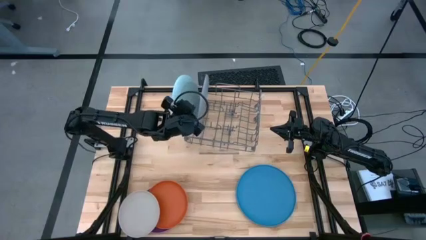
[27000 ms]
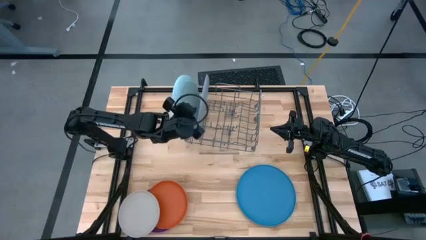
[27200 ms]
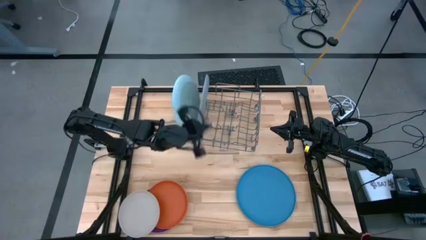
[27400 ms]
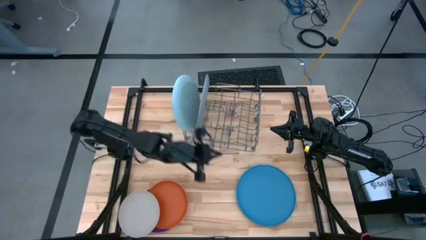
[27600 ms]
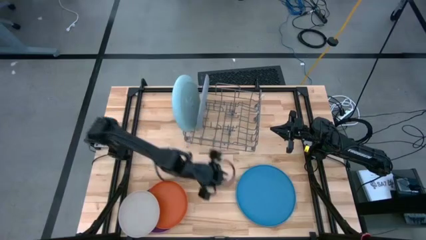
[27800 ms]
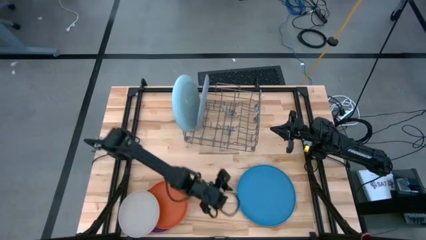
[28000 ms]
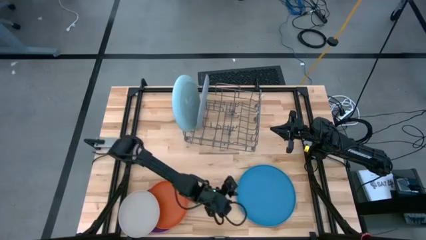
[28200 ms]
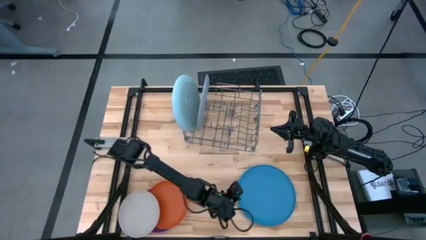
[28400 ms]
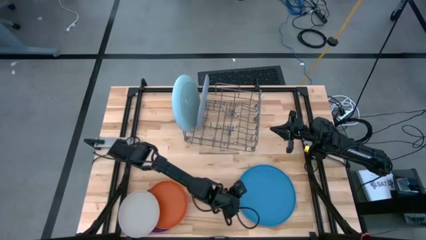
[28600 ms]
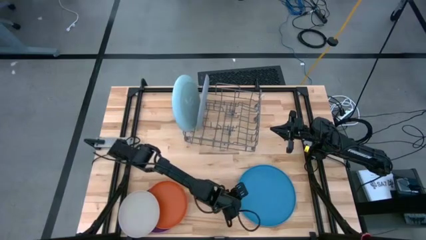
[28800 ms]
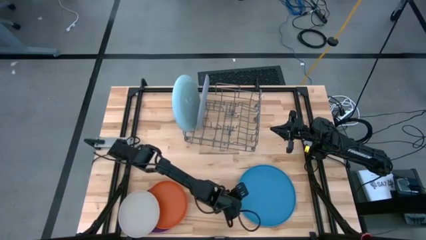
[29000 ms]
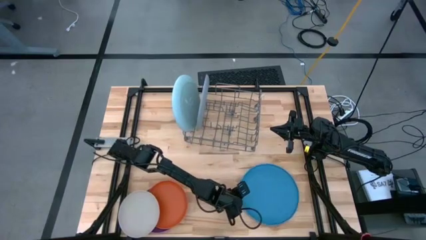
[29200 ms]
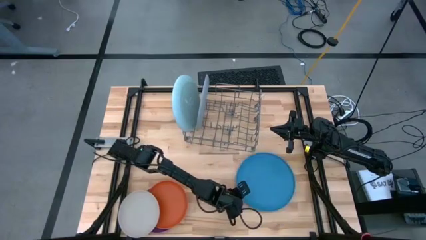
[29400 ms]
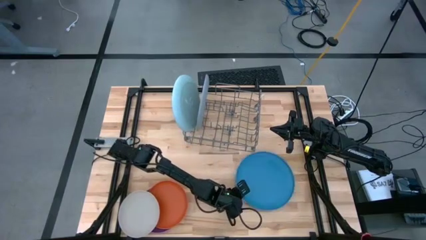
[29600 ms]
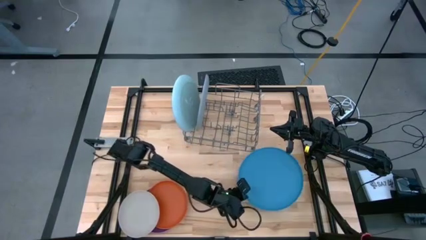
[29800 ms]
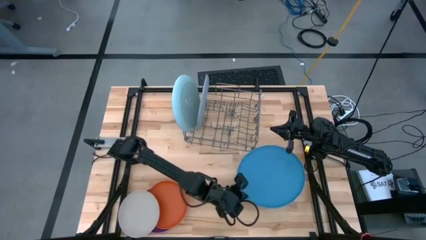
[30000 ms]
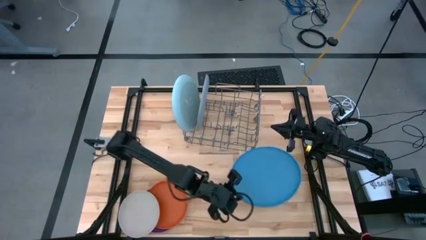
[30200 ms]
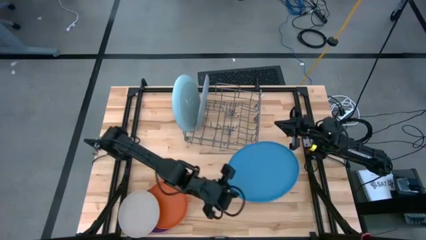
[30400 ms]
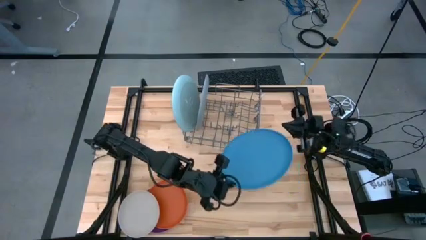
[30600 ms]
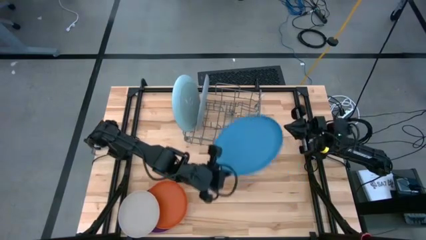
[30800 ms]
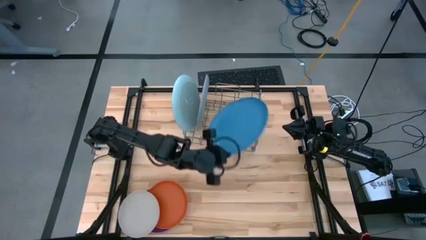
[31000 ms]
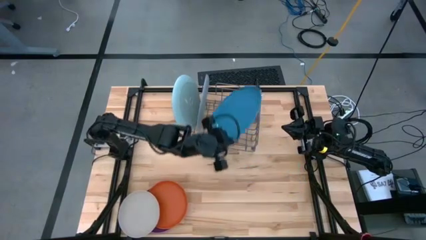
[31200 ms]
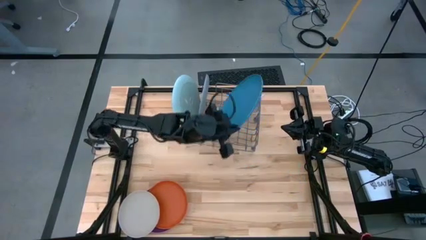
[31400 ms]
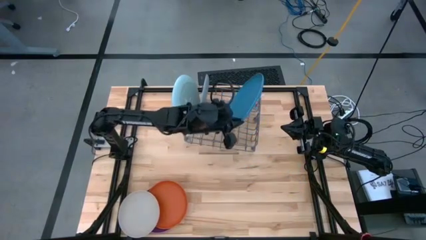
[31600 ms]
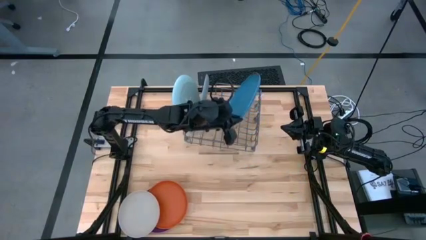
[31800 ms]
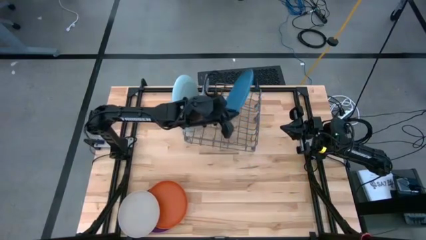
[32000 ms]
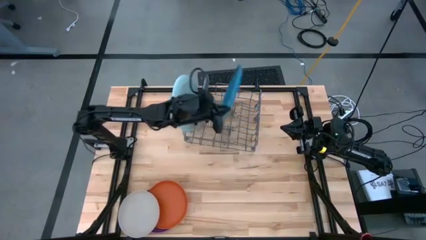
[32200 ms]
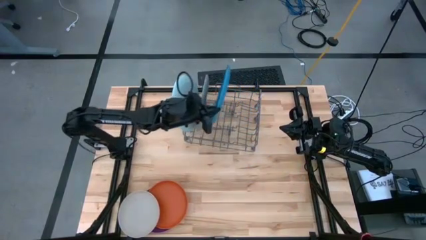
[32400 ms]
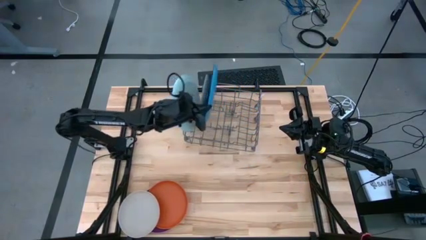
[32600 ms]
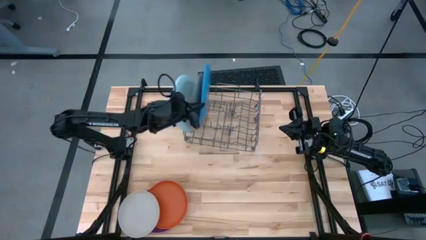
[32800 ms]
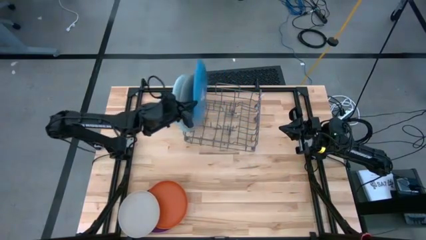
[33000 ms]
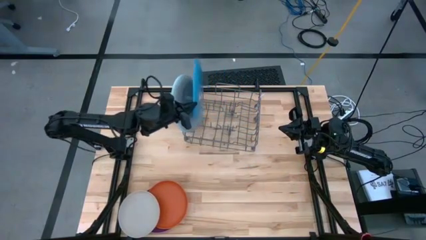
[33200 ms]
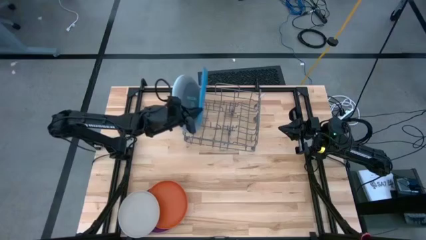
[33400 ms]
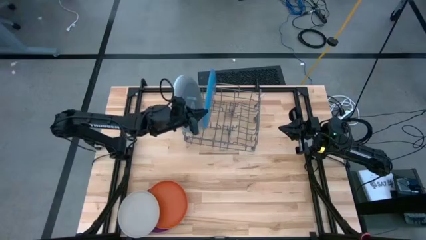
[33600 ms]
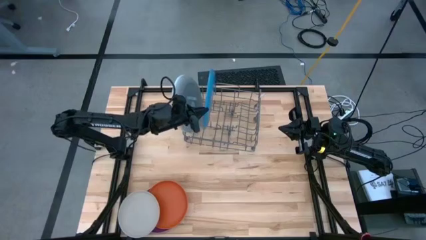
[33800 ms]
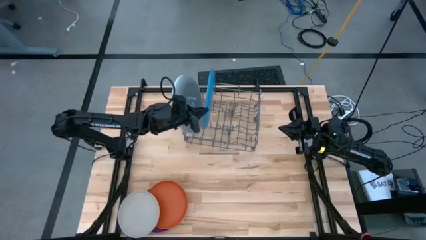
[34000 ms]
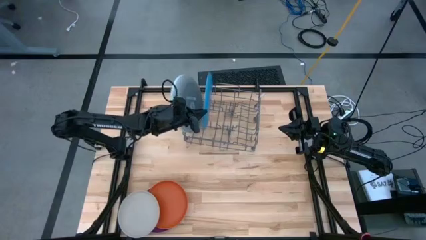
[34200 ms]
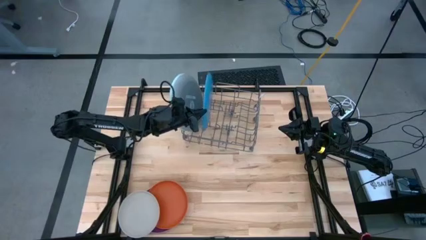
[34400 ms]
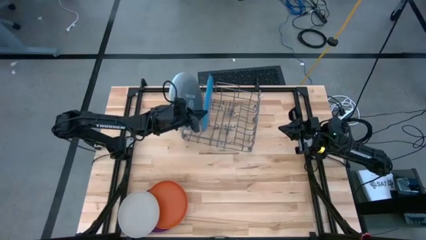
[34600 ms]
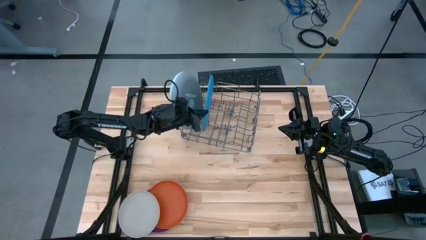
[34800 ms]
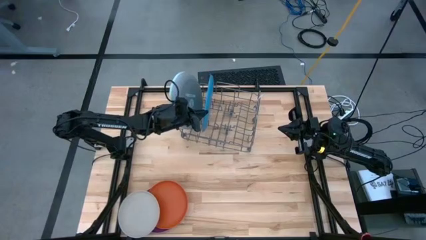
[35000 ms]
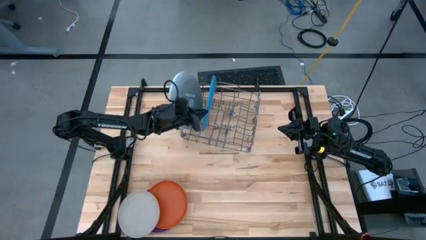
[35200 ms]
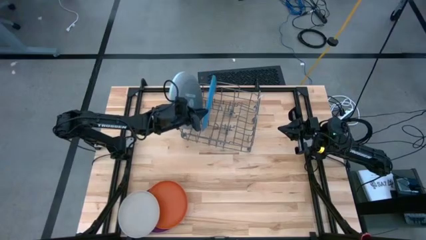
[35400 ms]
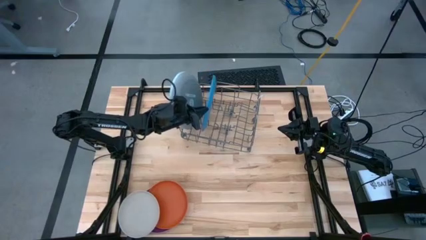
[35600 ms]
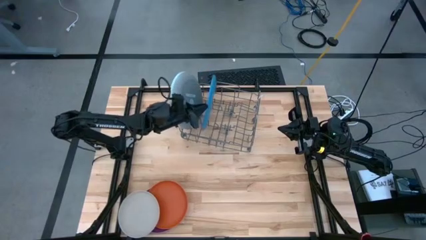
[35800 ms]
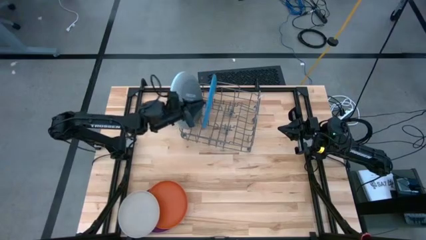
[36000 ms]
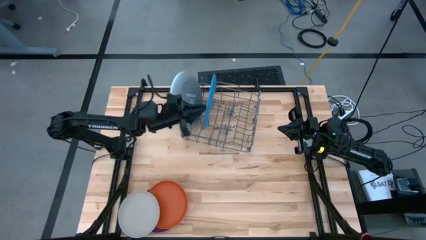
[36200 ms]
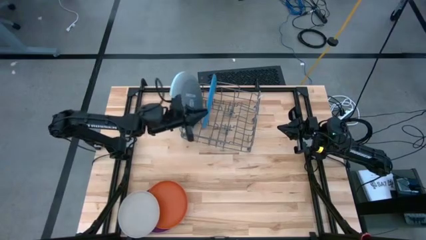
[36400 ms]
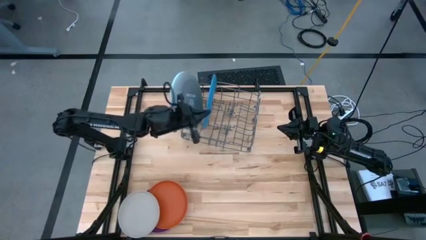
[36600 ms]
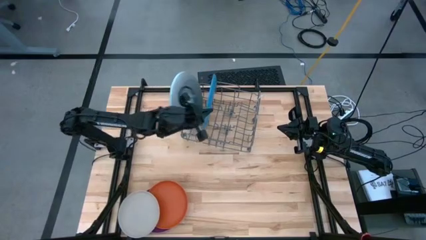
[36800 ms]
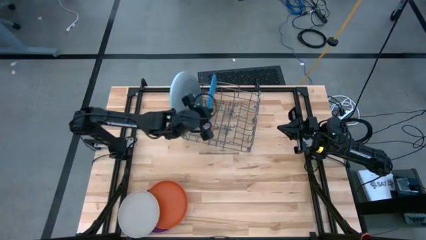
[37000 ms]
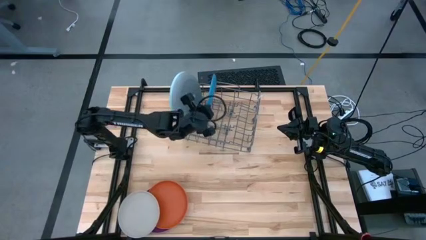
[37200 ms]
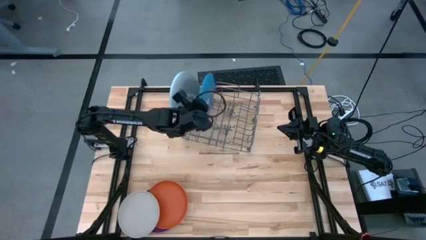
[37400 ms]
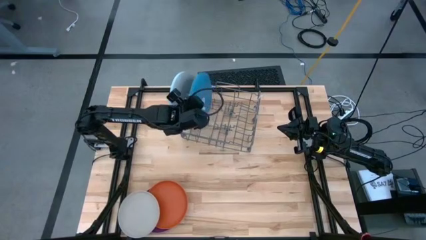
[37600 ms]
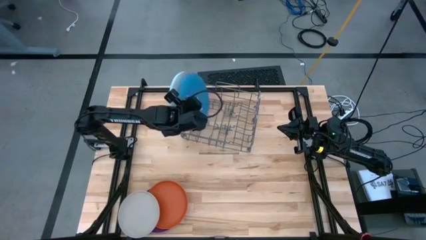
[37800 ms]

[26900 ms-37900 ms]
Task: Sort dishes
Put the blue plate into the dish rack
